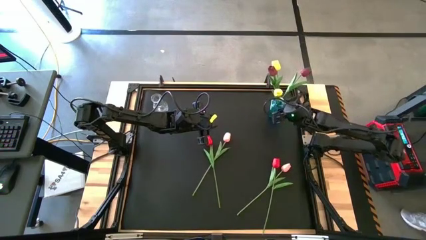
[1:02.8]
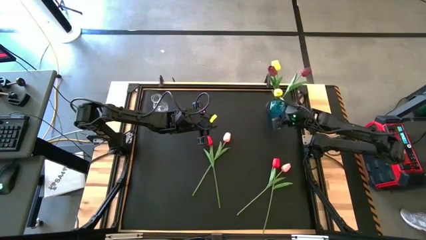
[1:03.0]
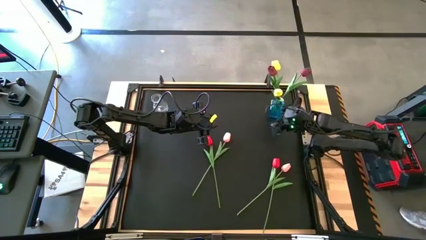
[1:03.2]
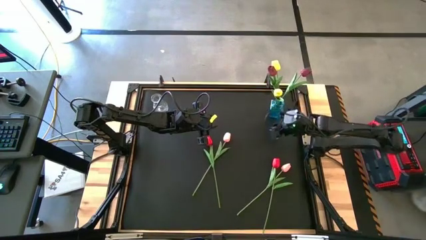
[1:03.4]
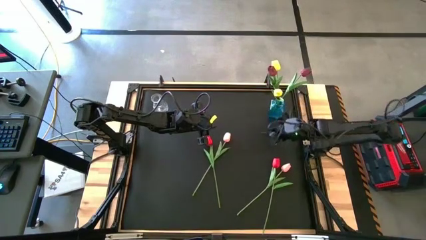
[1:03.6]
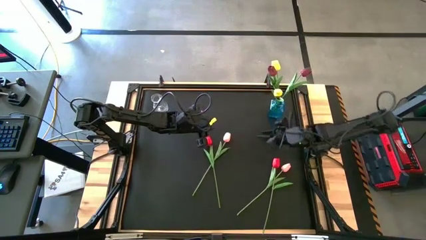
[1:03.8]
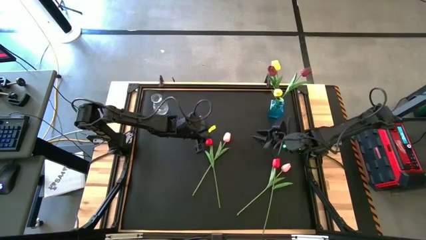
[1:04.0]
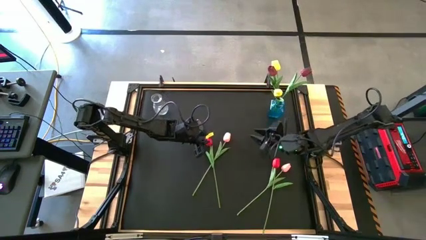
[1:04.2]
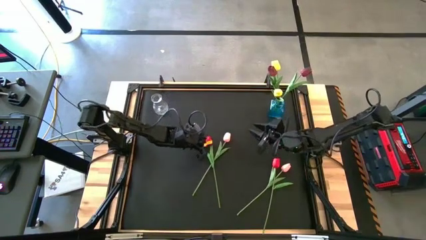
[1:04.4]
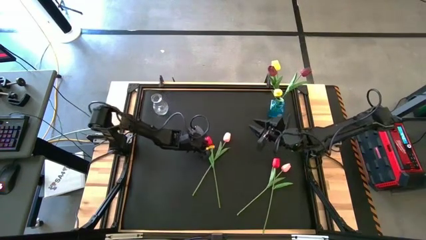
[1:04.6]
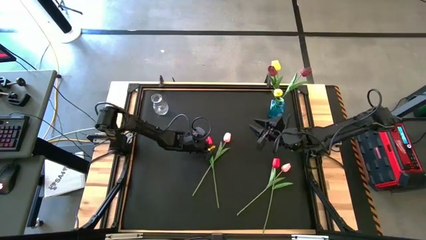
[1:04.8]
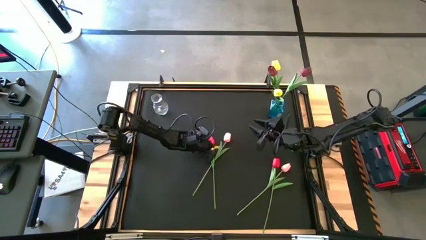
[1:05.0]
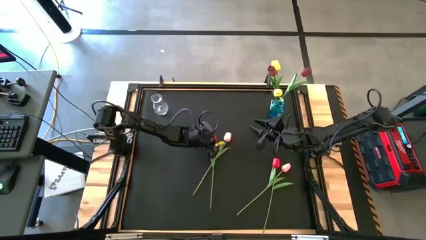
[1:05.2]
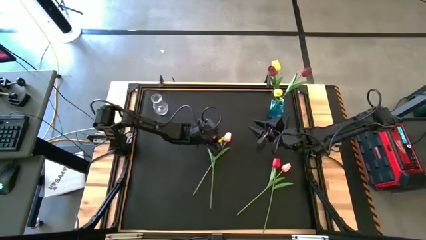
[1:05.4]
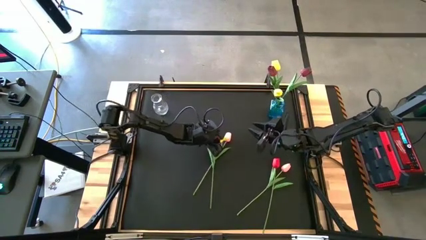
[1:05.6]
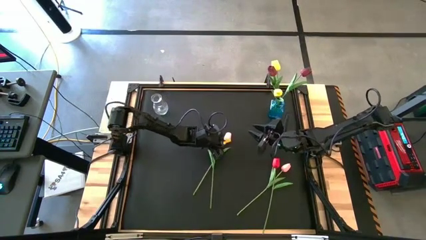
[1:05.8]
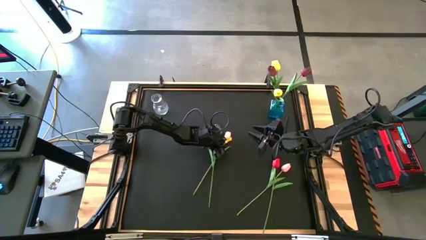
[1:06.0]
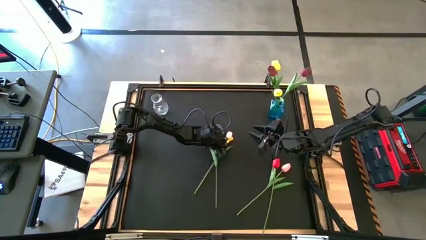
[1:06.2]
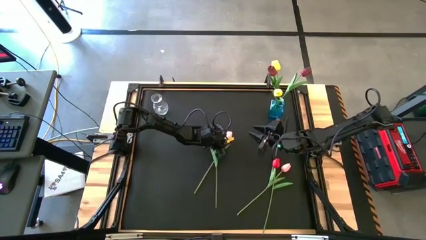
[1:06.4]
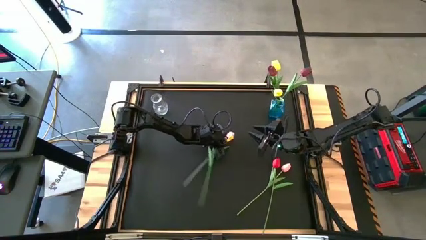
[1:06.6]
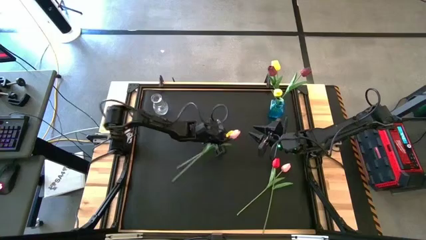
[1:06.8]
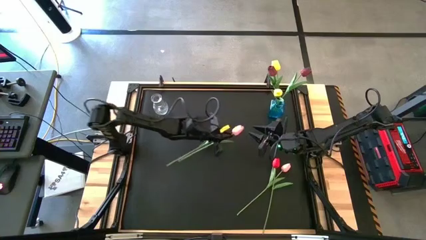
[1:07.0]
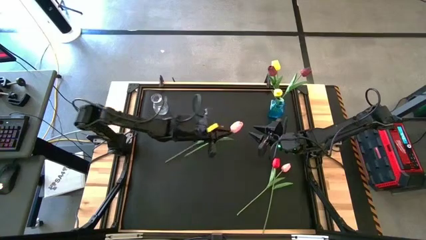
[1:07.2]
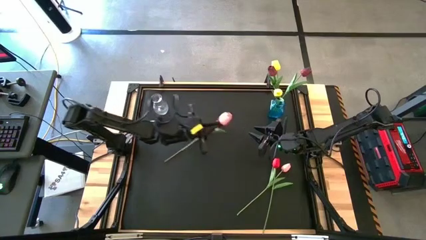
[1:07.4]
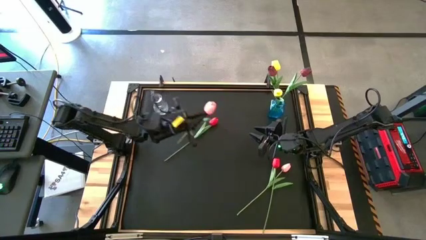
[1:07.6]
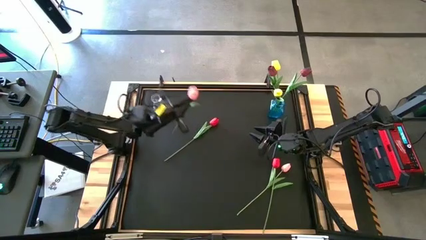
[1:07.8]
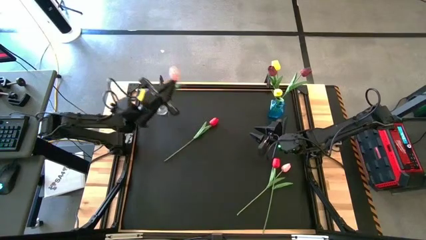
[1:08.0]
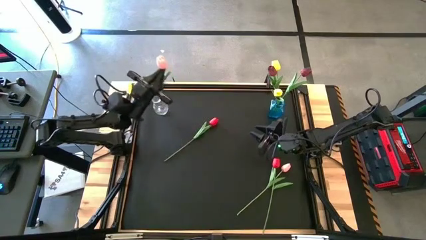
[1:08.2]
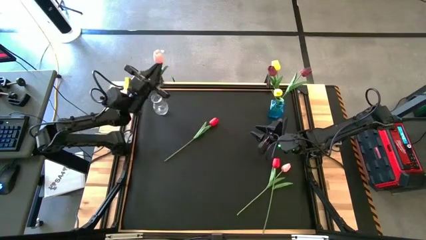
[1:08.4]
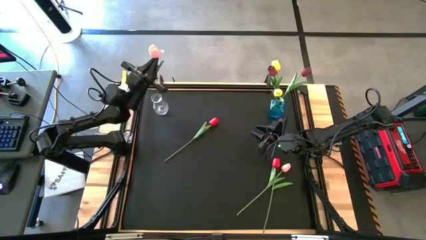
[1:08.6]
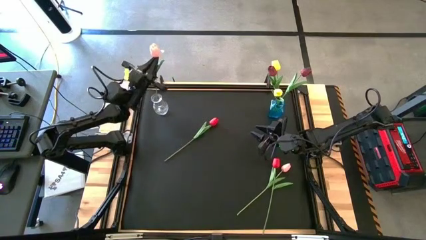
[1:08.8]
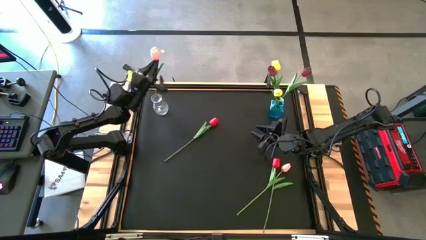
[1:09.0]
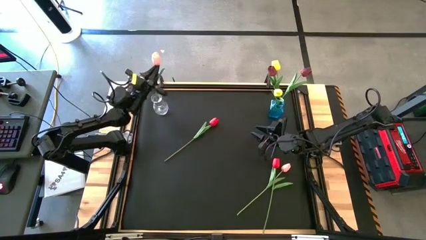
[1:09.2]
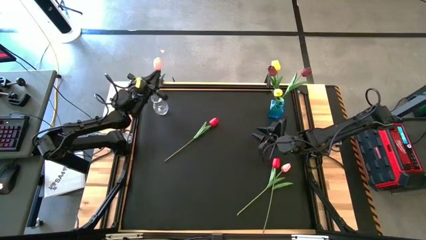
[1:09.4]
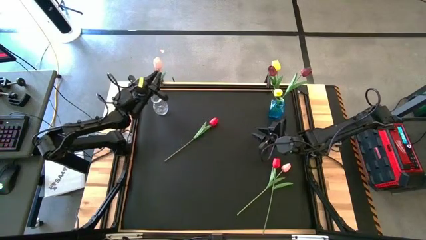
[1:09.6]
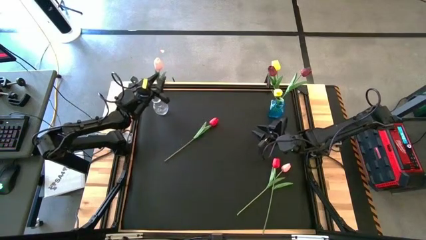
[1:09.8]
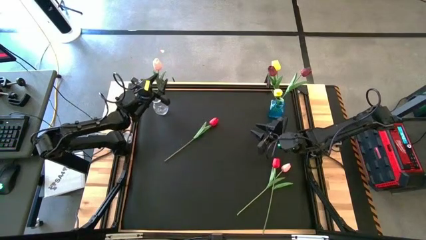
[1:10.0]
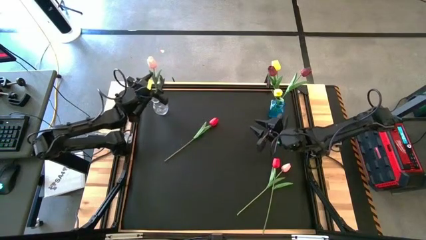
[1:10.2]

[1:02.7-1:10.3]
Task: Sort flowers into vase by color
Put the left pink flower into the transparent vase

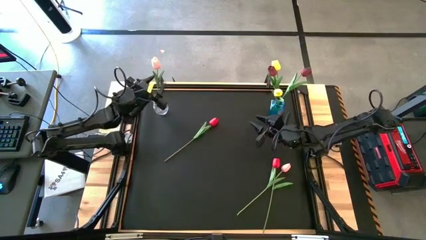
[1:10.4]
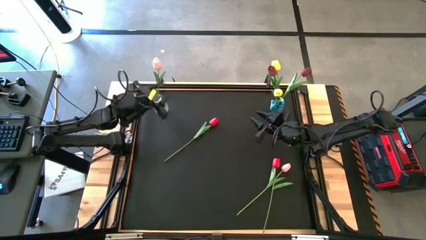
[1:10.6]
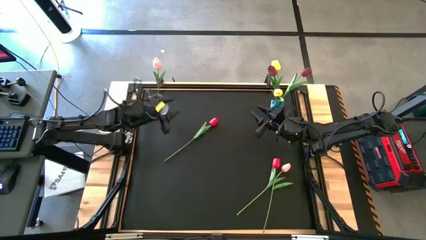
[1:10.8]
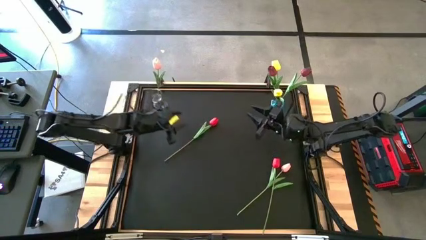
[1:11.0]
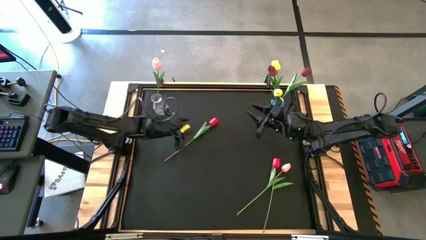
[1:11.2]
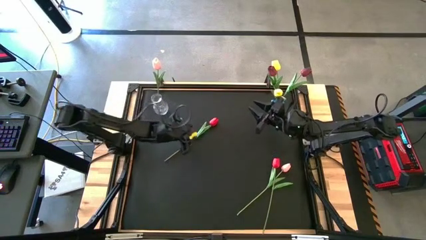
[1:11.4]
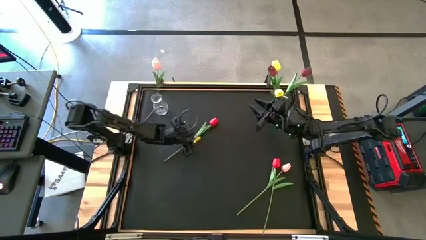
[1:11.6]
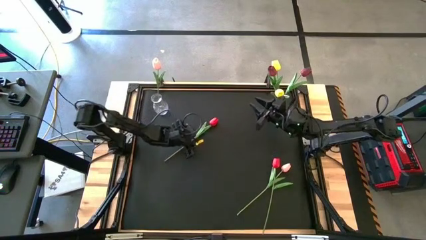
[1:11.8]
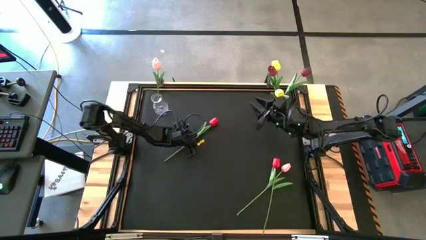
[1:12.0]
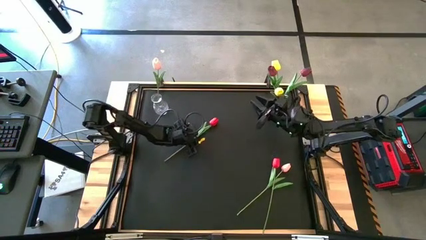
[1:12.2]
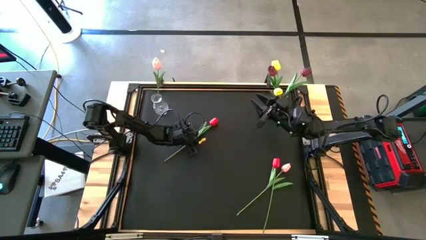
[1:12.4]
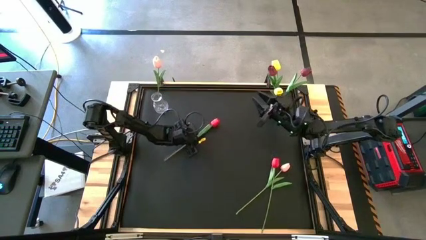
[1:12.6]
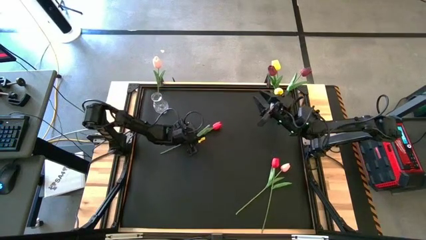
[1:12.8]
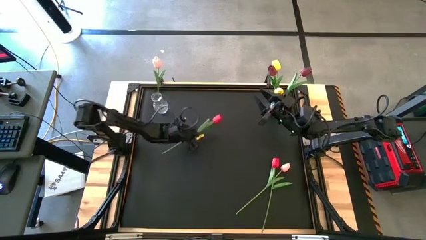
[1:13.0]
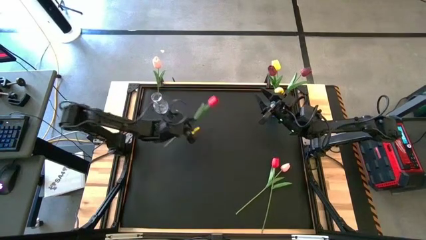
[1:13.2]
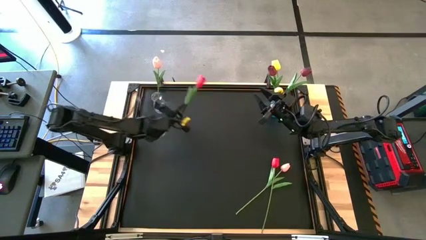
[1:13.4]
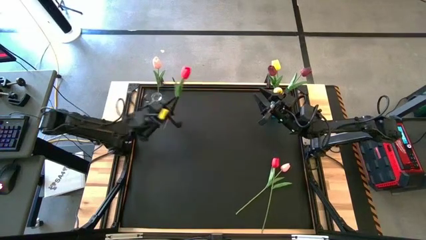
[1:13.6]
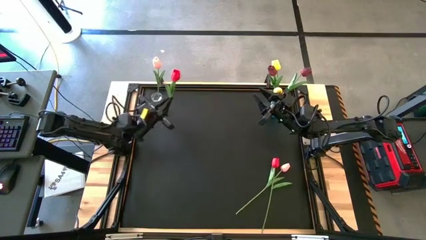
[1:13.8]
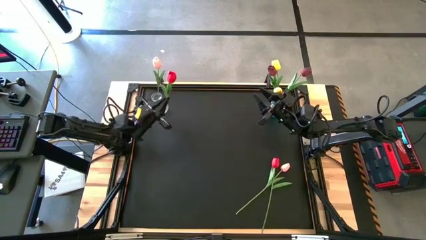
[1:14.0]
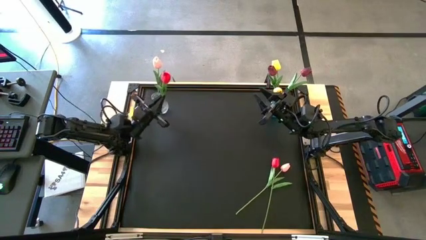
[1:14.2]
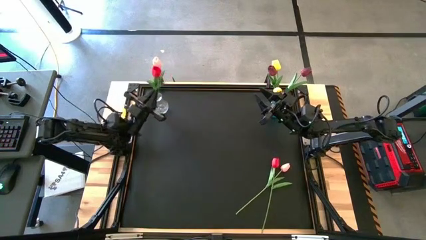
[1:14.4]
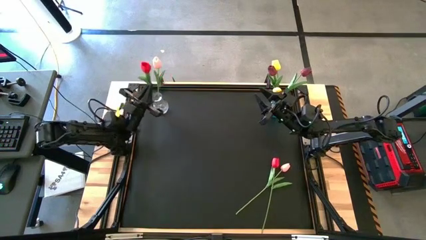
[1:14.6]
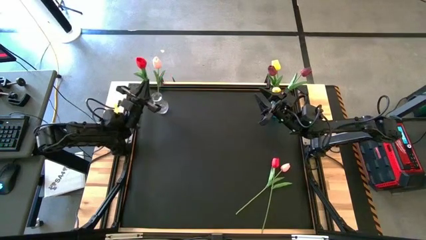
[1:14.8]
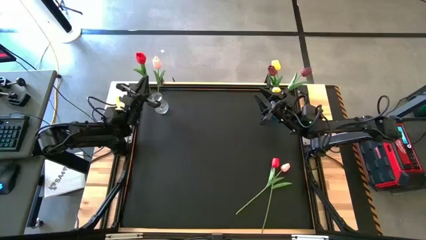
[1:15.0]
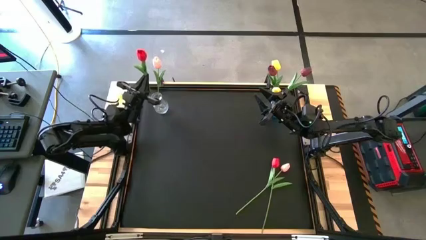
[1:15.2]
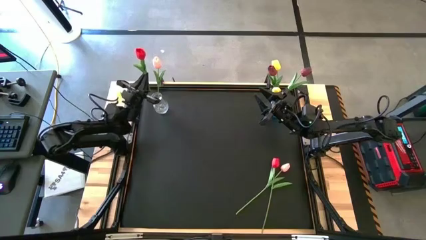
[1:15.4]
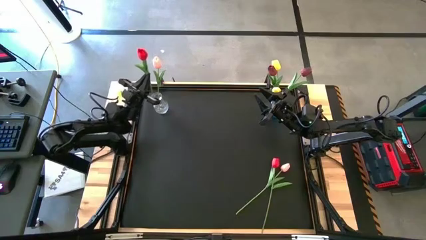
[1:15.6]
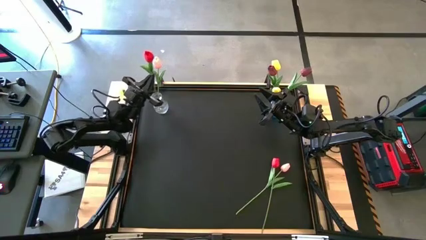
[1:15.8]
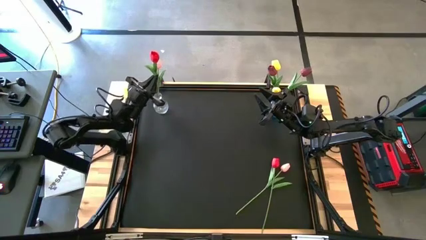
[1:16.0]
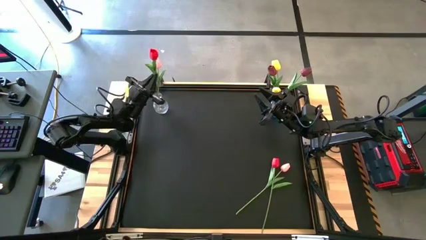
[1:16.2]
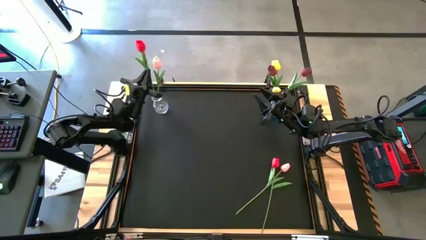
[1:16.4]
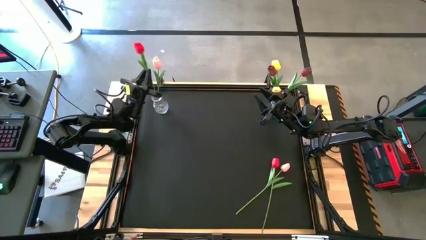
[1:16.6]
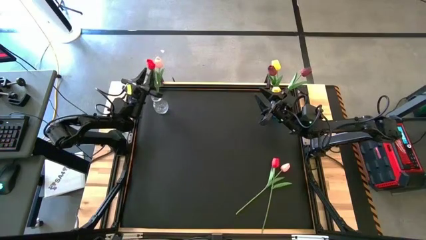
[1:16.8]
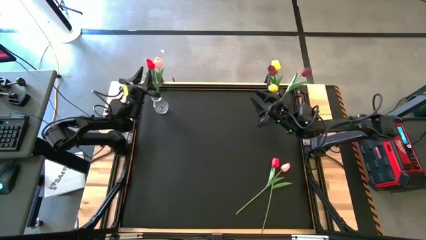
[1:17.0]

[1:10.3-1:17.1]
Put the left red flower into the transparent vase
